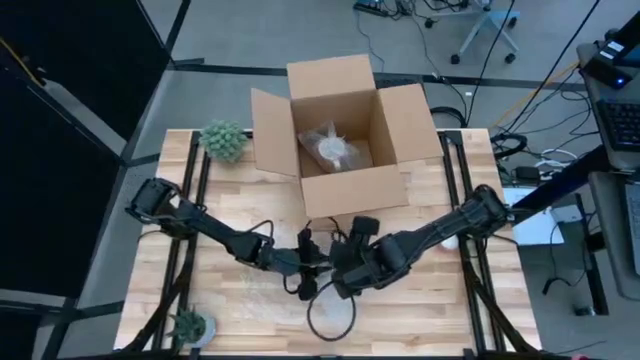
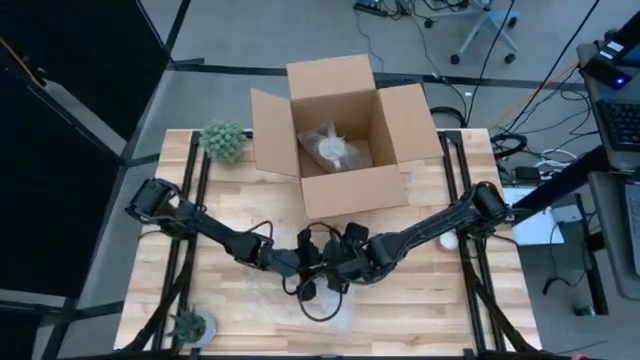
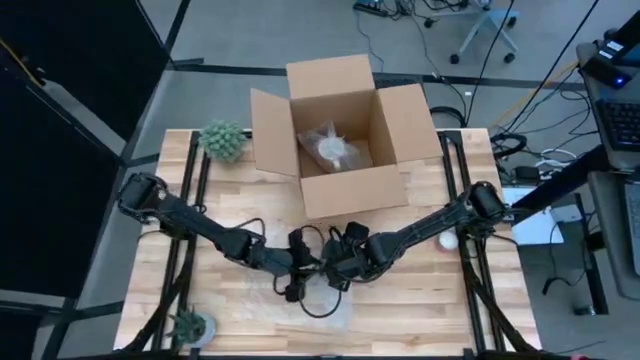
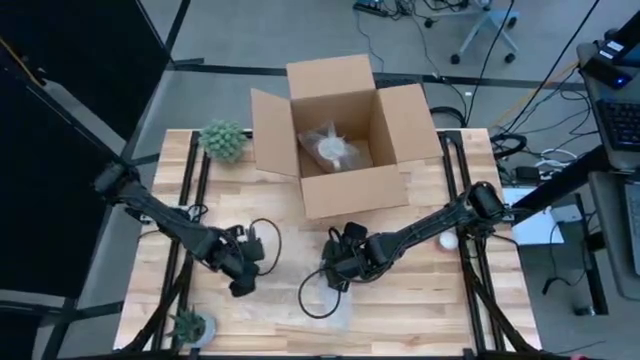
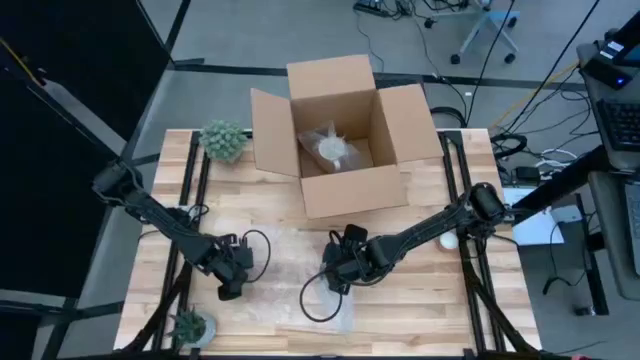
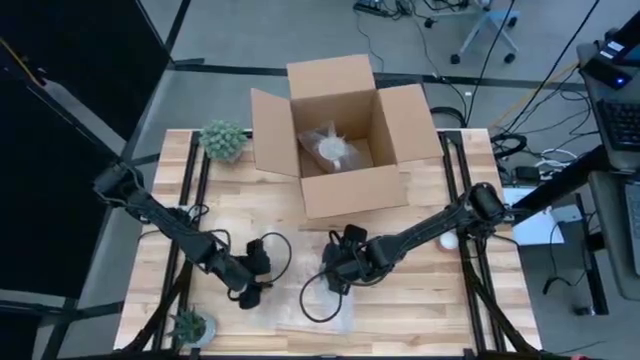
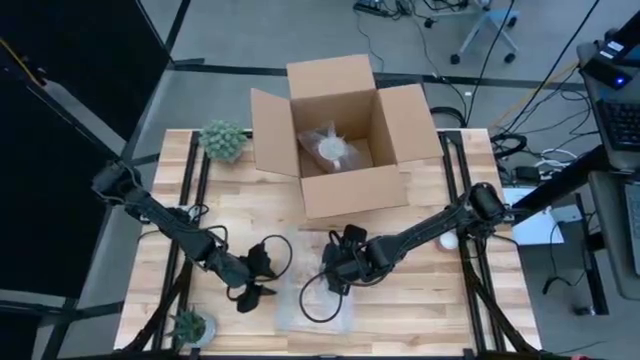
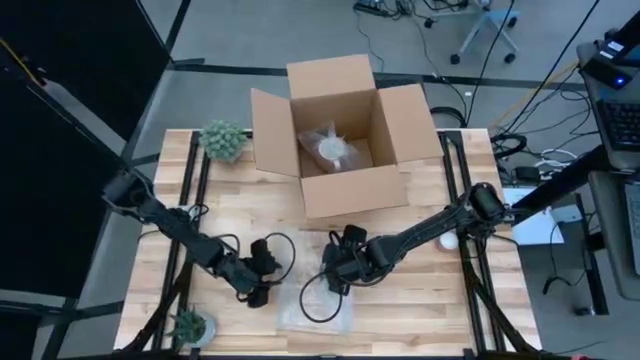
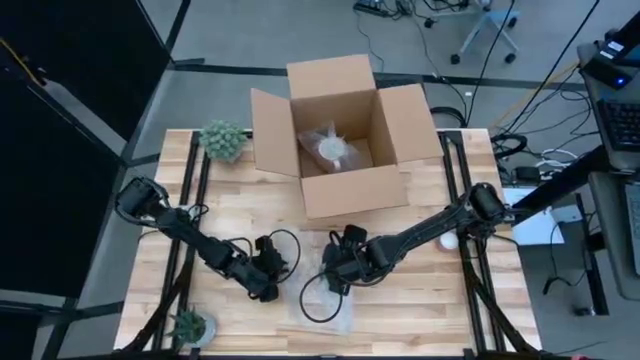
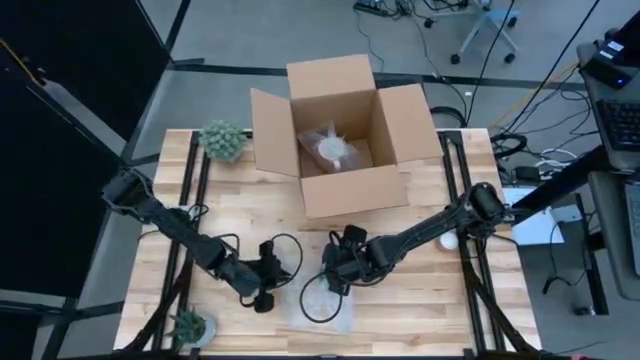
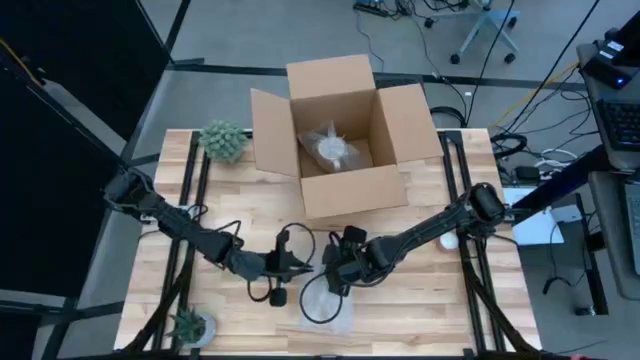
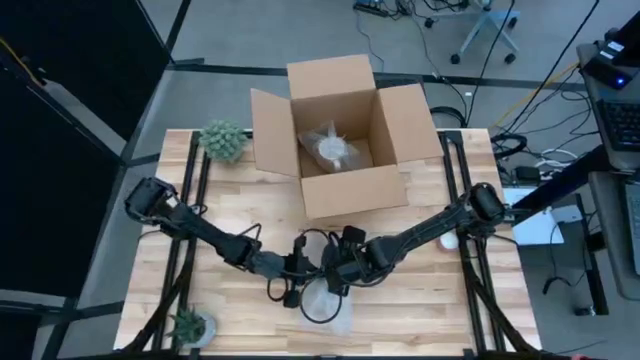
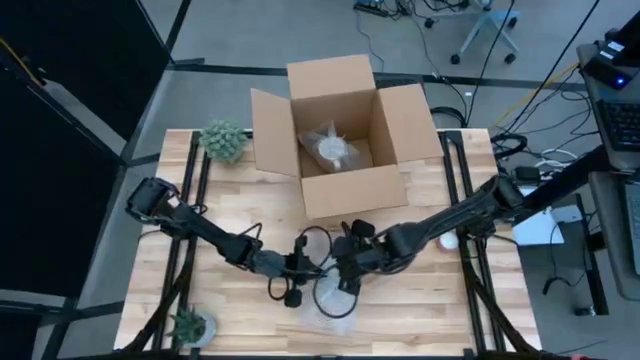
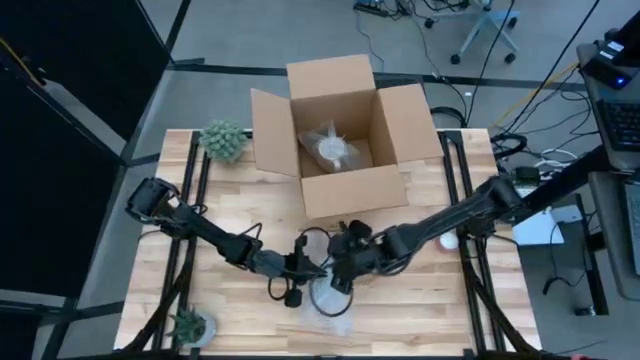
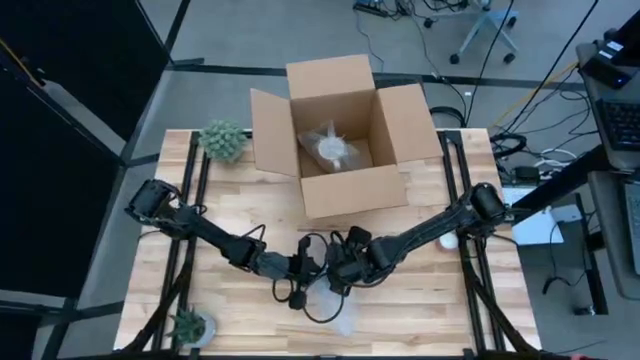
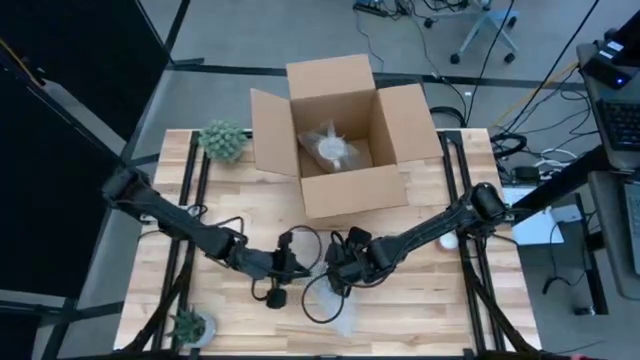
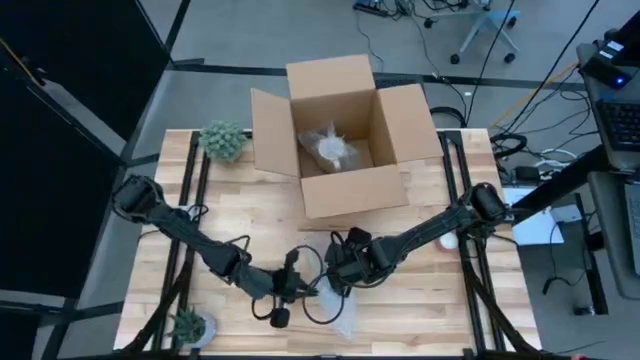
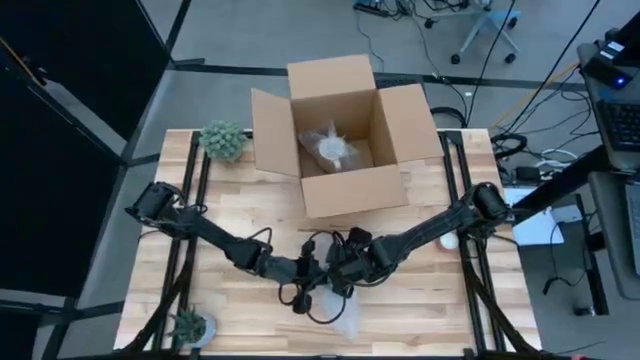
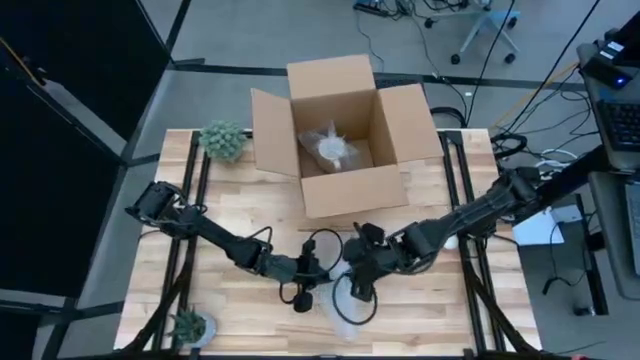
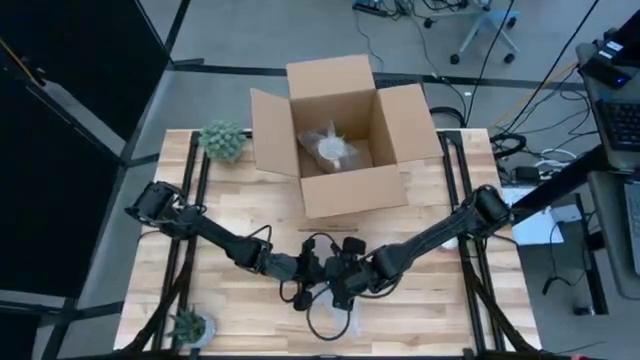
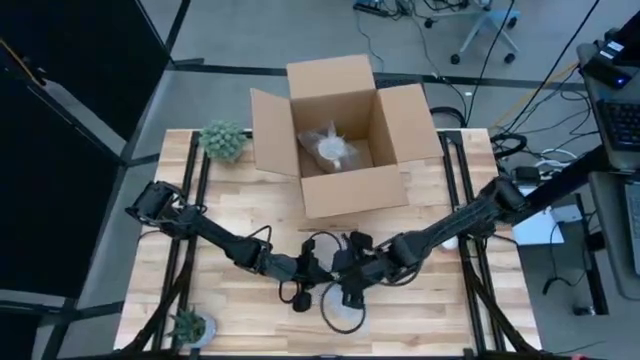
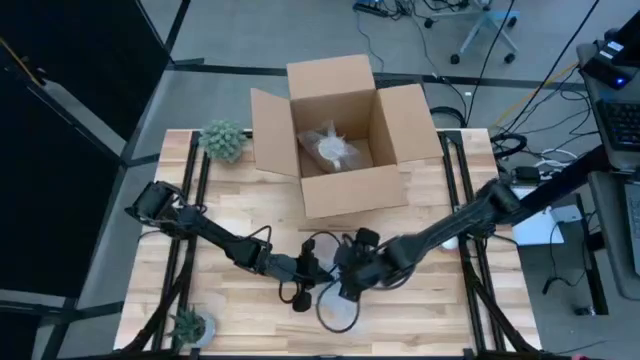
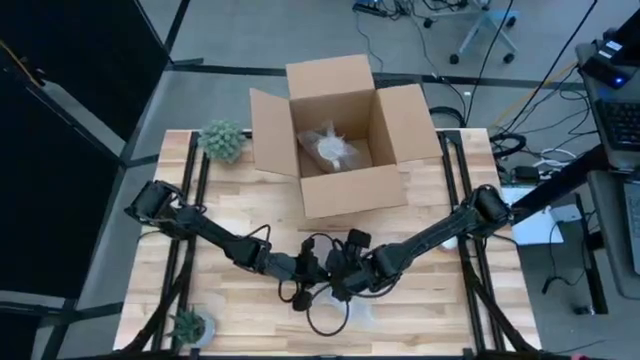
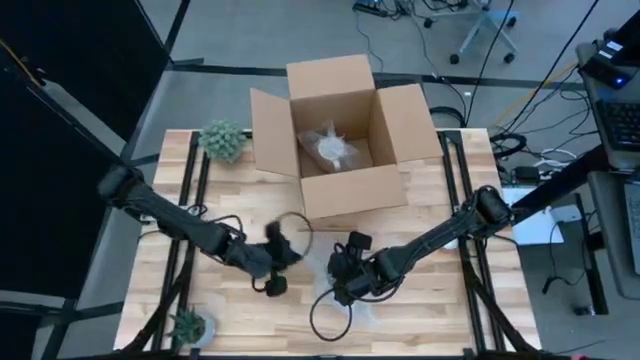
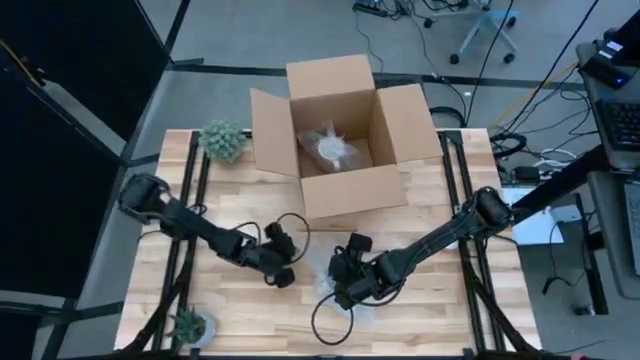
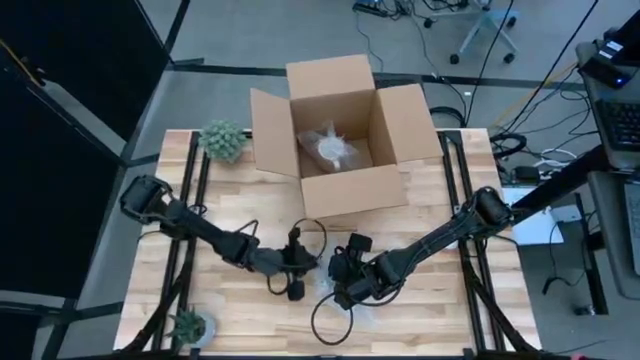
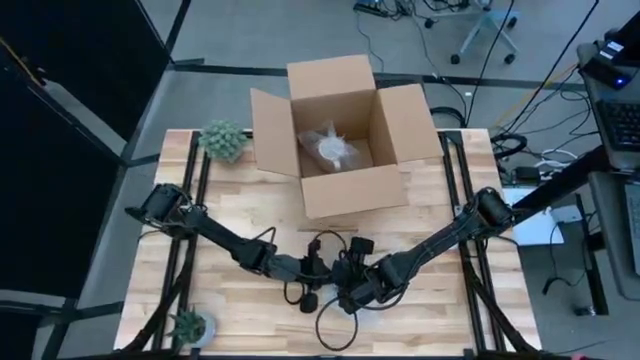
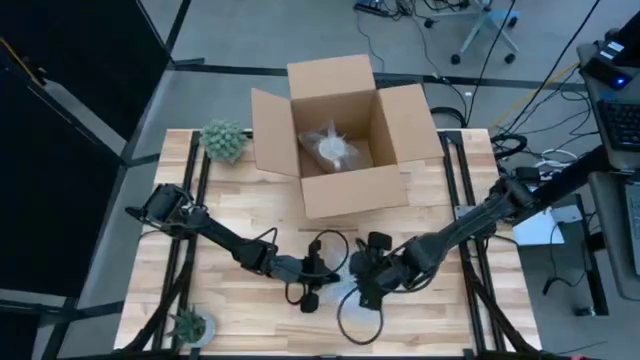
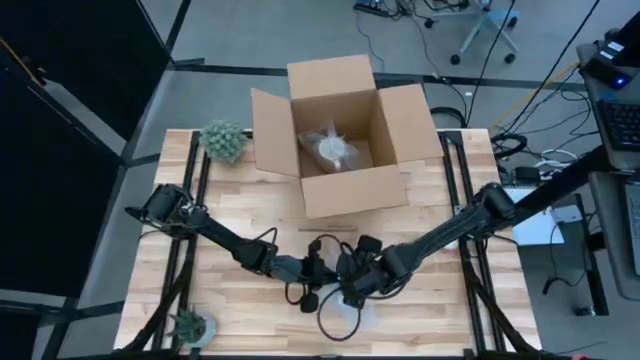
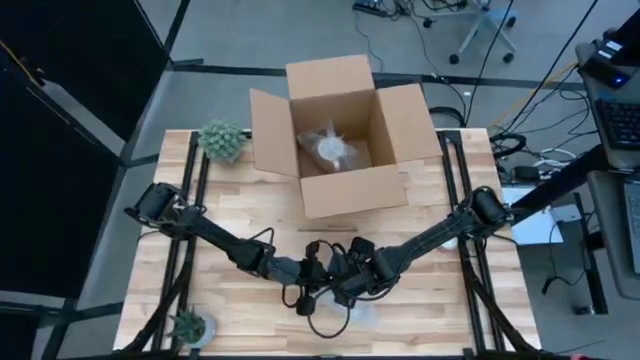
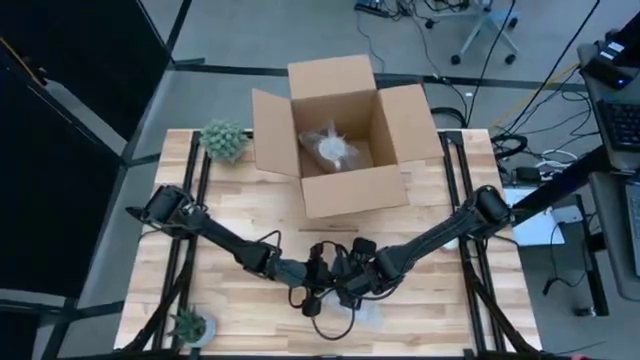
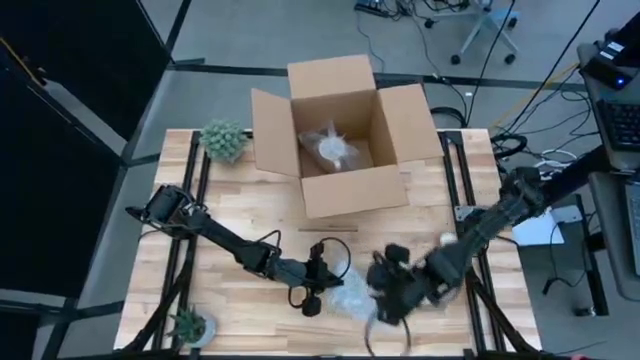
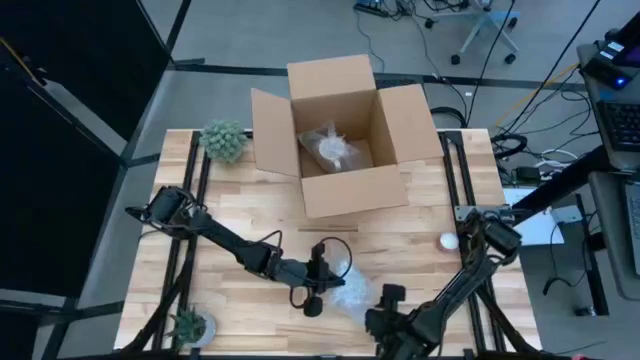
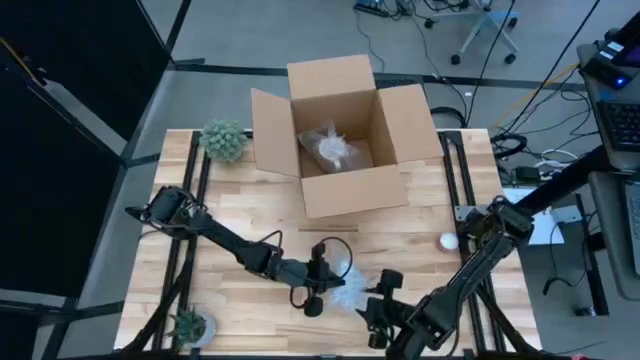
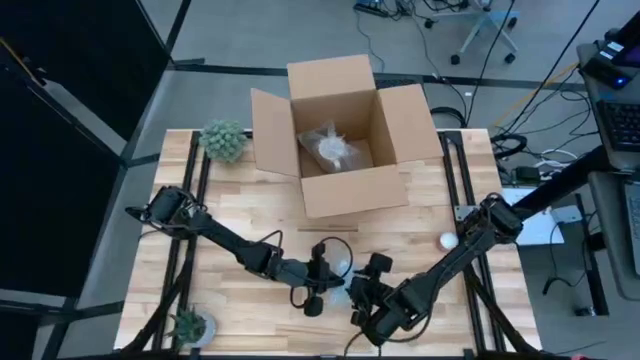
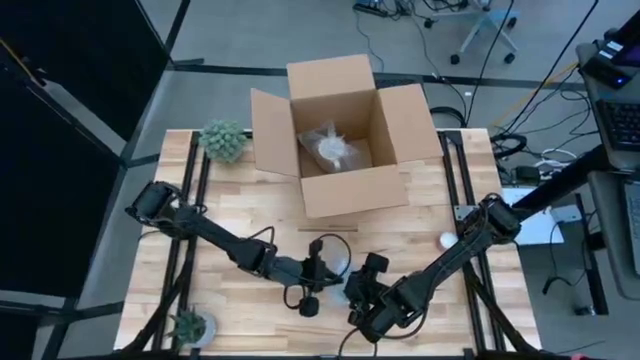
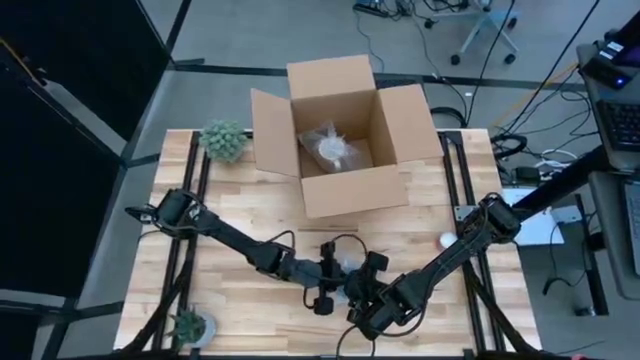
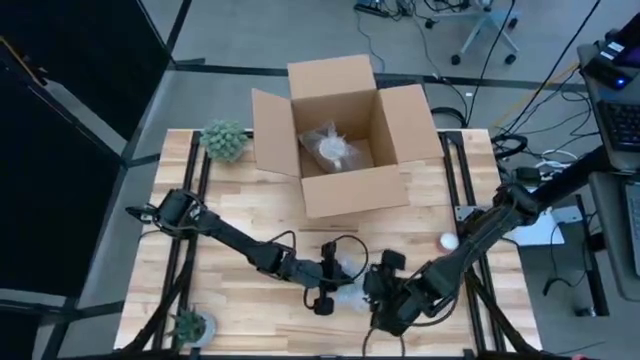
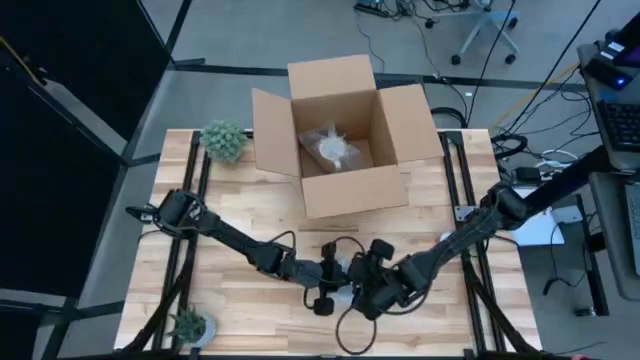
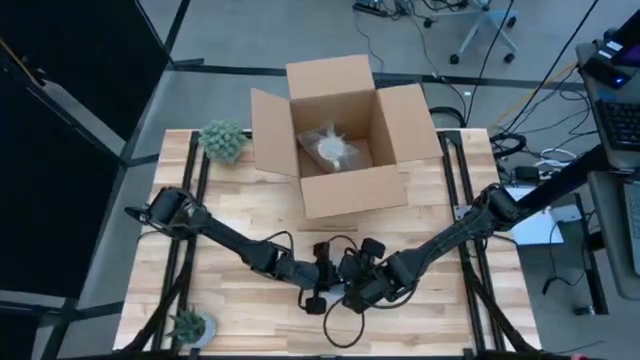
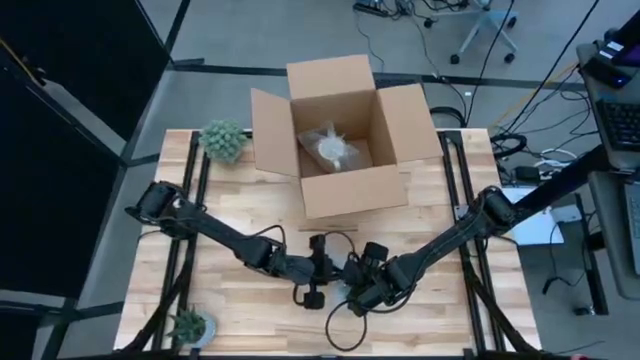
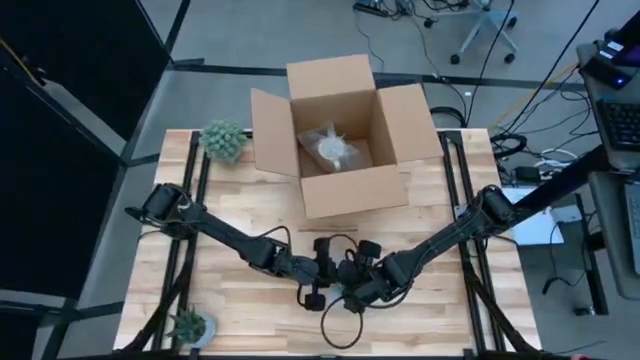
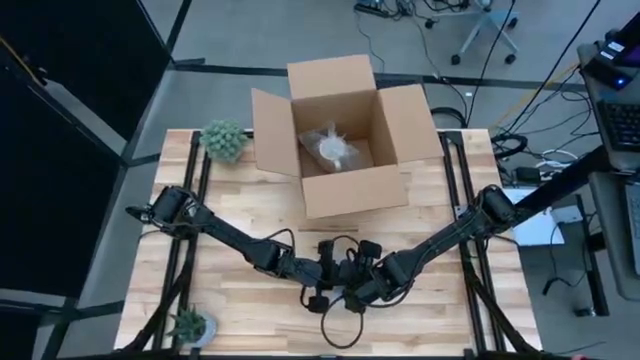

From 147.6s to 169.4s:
Task: wrap mug
Wrap the red mug with bubble wrap
